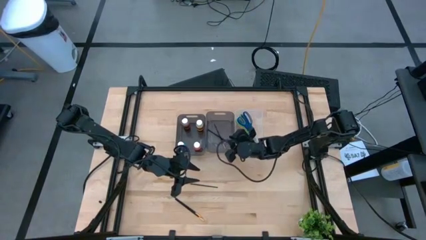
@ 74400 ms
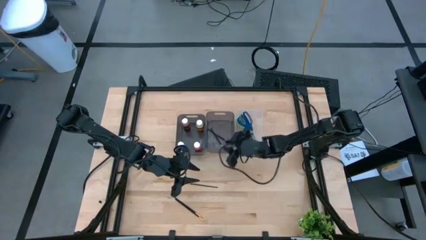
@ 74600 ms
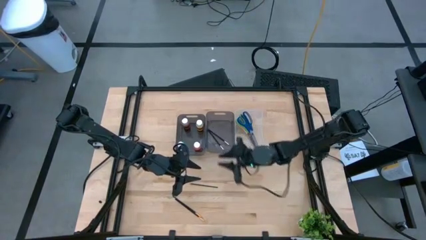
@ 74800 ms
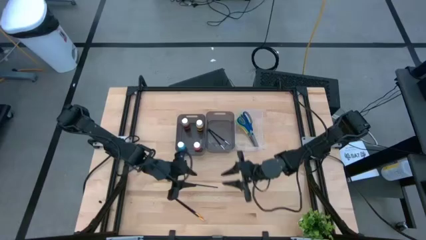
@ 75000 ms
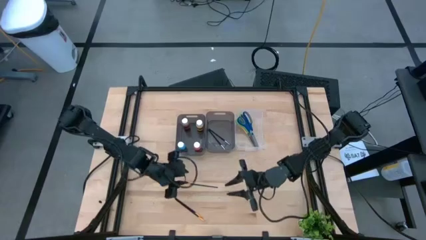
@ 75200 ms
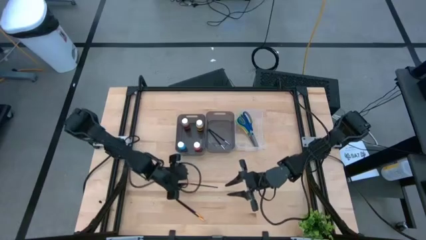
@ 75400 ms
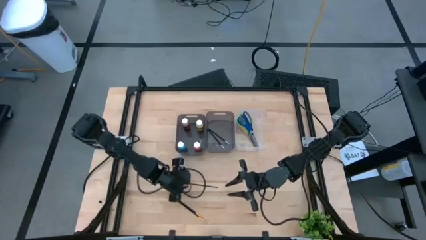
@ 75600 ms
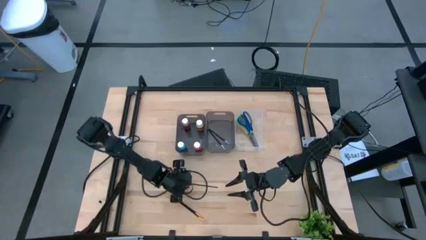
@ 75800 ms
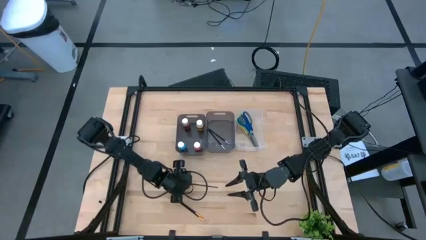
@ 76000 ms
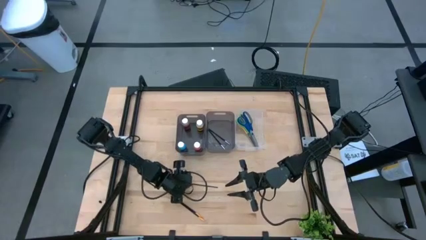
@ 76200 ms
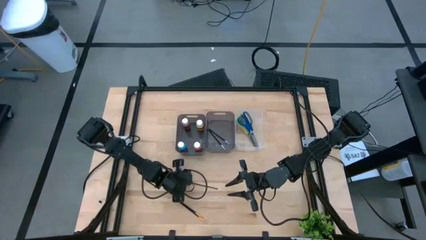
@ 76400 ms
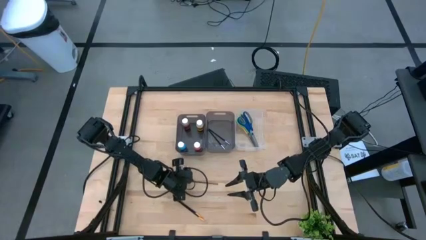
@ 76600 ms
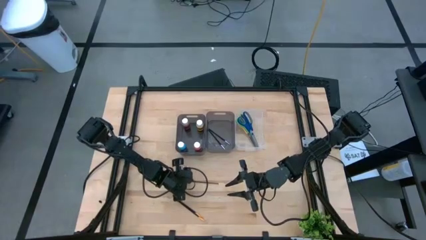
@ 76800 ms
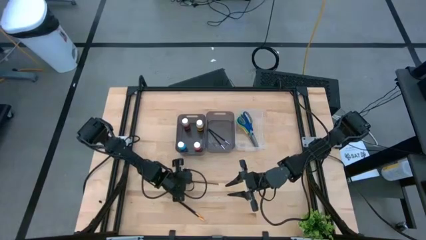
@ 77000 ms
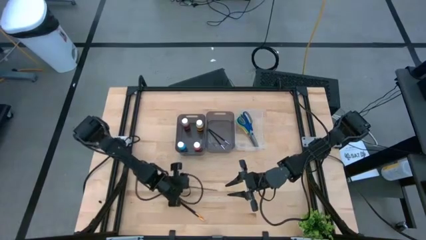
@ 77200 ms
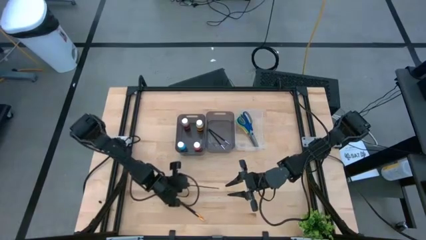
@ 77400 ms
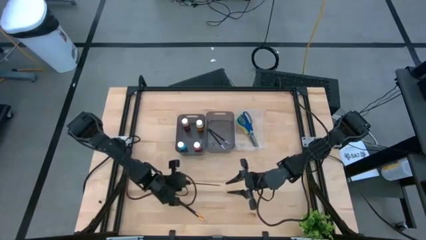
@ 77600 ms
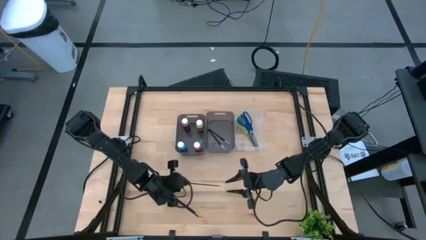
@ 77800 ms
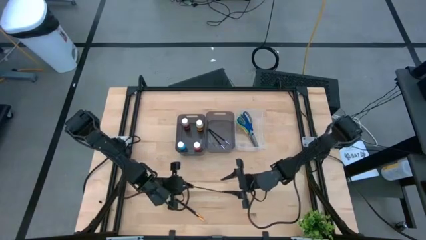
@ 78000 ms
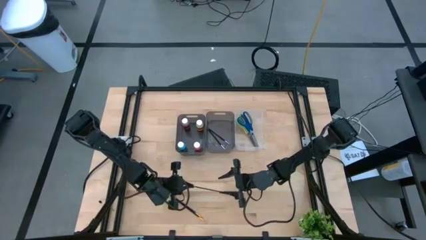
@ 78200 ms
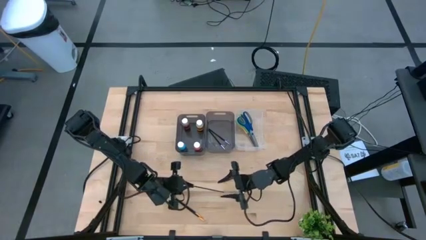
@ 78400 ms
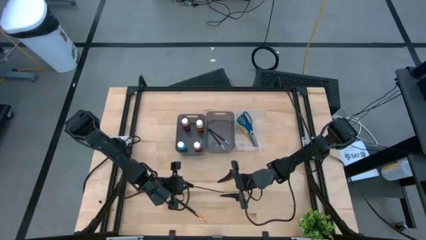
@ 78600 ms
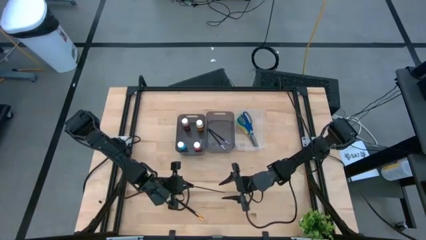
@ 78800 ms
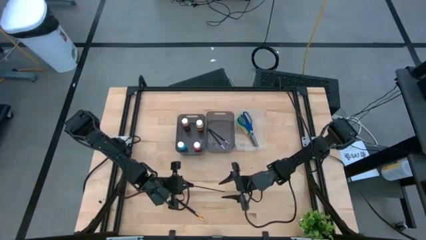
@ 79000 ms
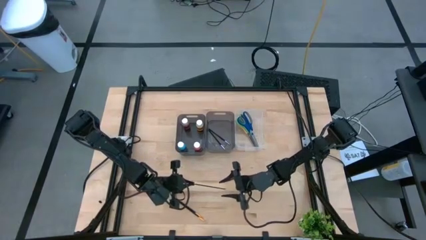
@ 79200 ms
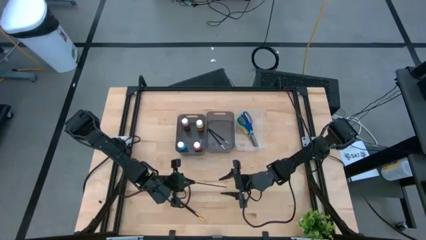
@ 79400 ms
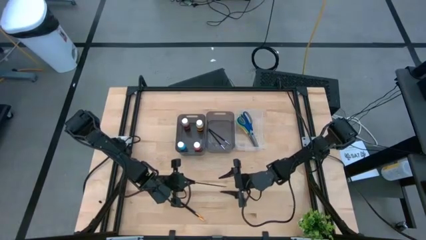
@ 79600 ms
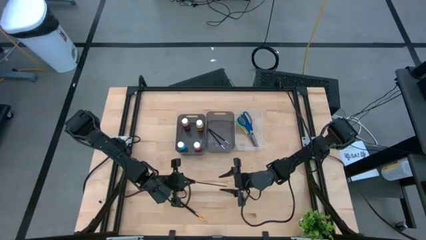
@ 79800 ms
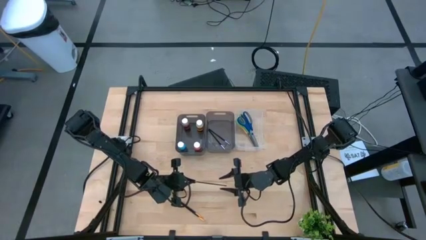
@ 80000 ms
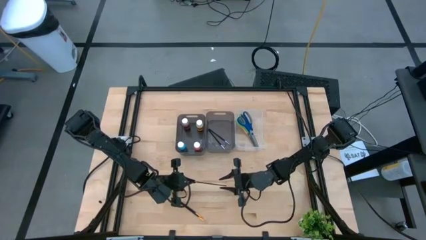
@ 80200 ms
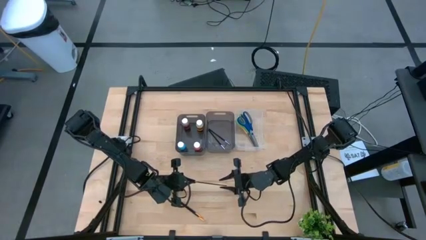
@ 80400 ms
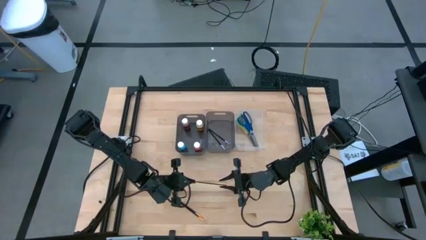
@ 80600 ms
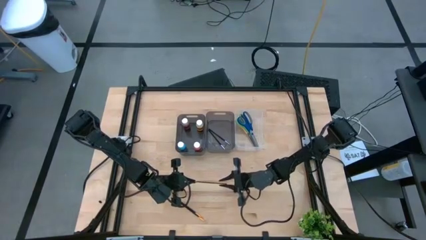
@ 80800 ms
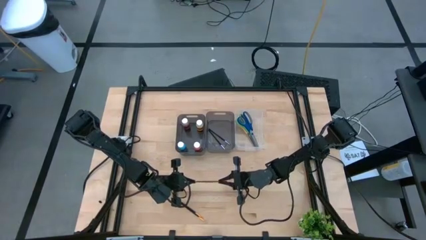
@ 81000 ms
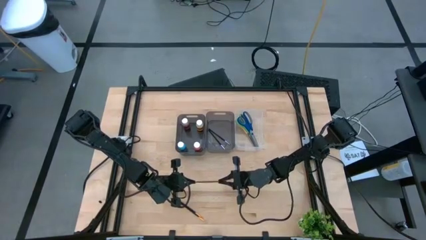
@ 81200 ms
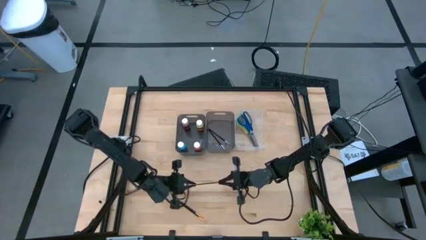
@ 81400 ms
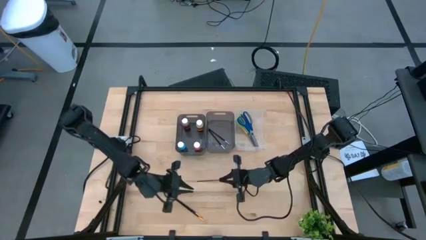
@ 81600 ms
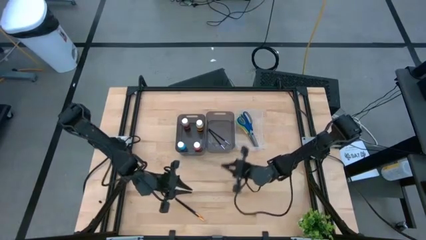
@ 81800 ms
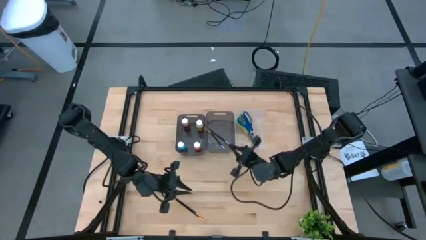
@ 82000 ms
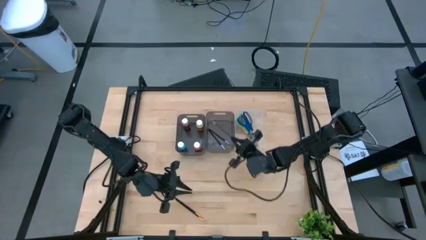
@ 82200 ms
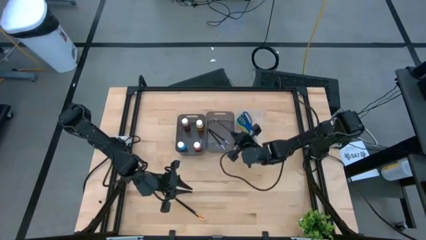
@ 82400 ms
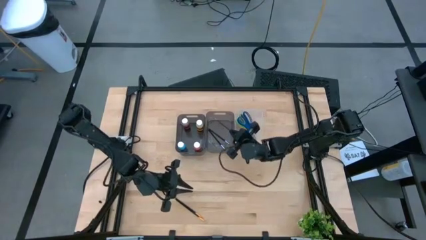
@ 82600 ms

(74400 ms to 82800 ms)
Task: Pick & Place Paint Supplies
Put the top gold paintbrush into the right black bin

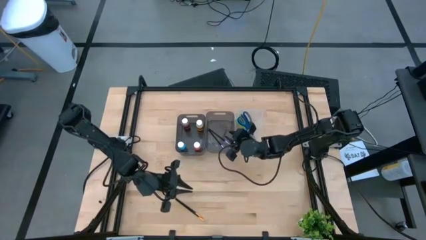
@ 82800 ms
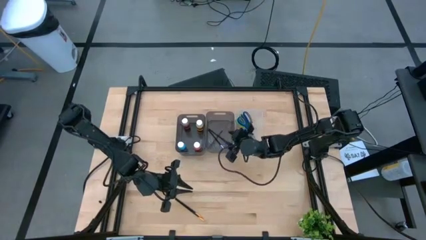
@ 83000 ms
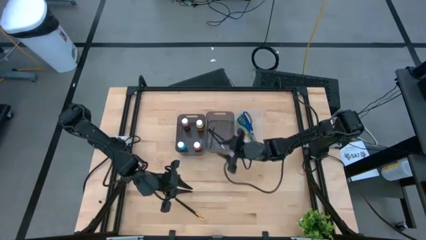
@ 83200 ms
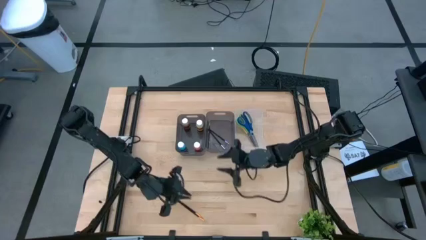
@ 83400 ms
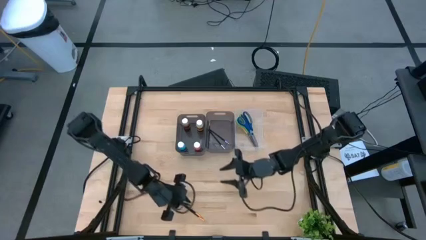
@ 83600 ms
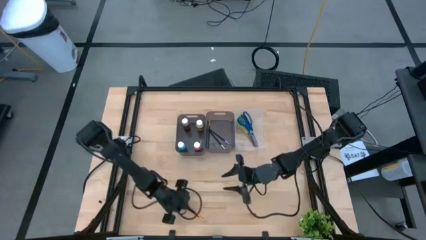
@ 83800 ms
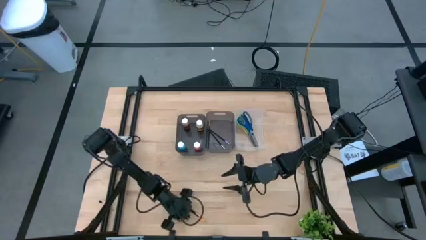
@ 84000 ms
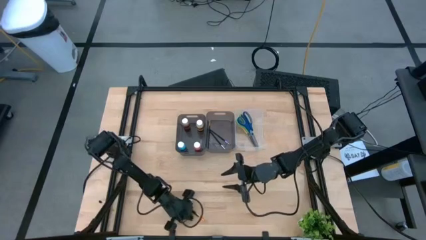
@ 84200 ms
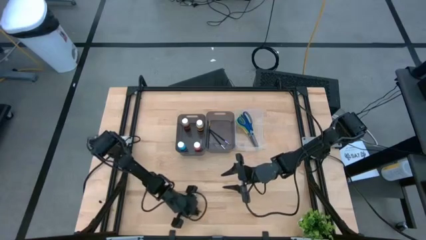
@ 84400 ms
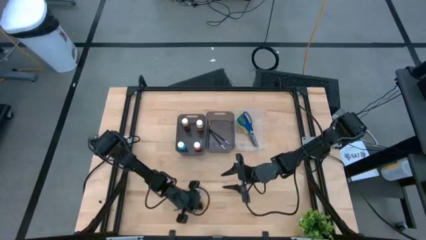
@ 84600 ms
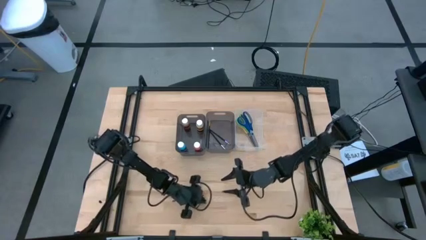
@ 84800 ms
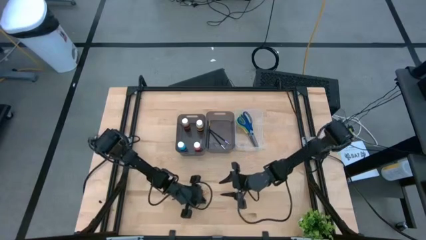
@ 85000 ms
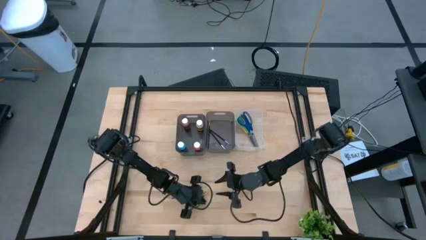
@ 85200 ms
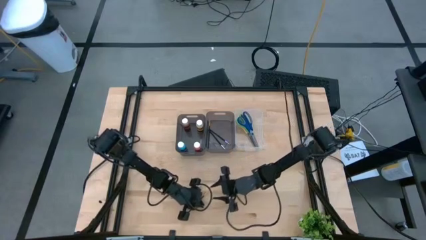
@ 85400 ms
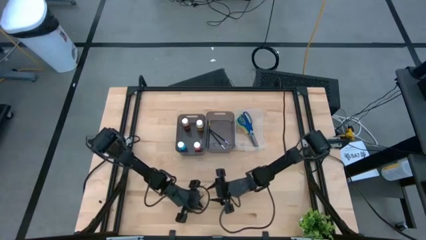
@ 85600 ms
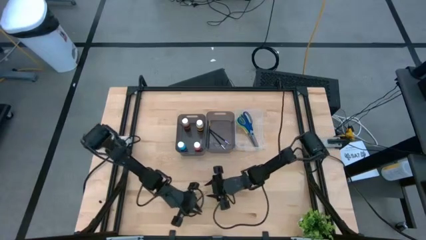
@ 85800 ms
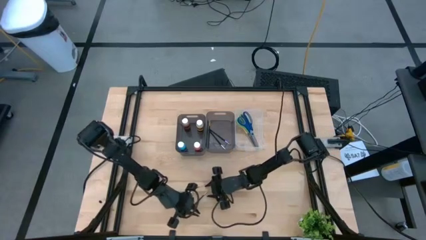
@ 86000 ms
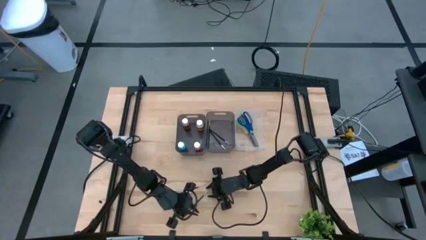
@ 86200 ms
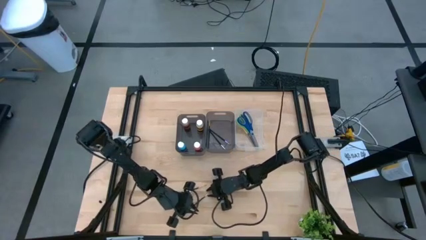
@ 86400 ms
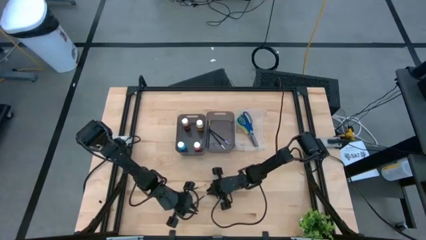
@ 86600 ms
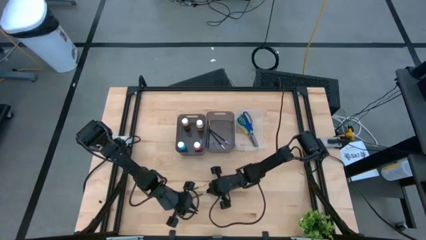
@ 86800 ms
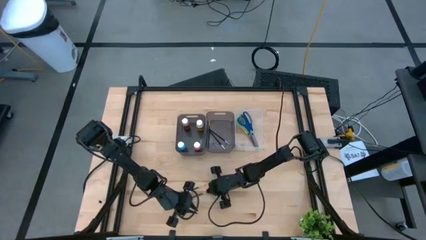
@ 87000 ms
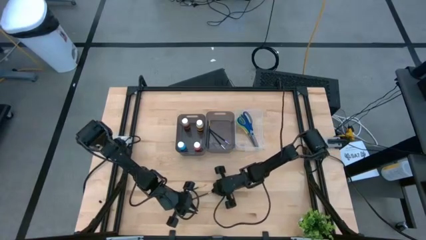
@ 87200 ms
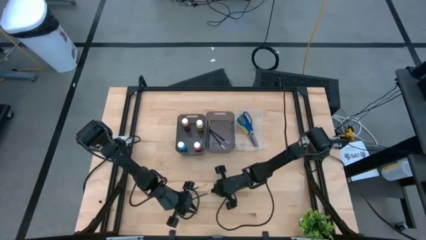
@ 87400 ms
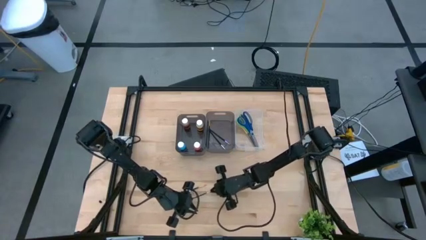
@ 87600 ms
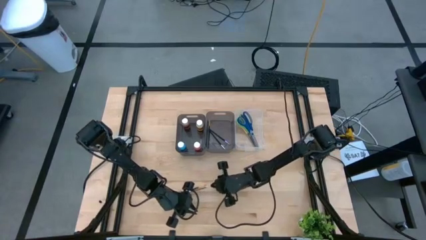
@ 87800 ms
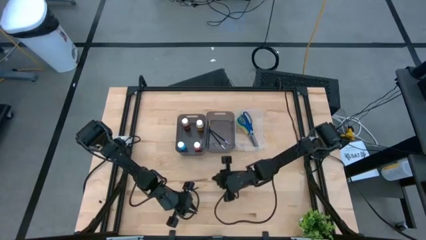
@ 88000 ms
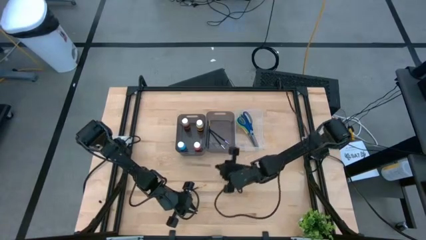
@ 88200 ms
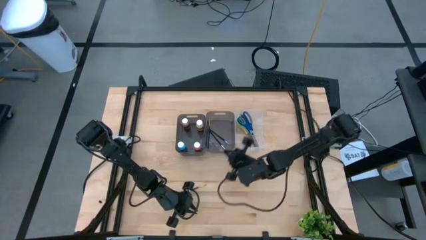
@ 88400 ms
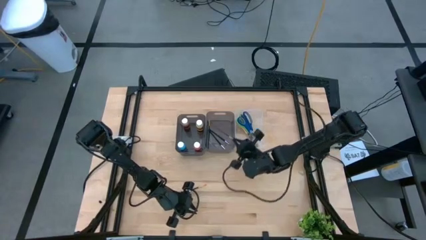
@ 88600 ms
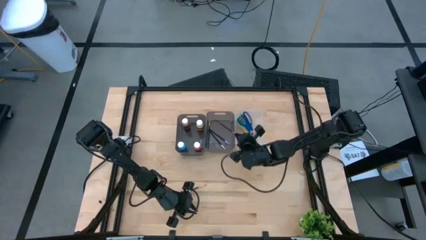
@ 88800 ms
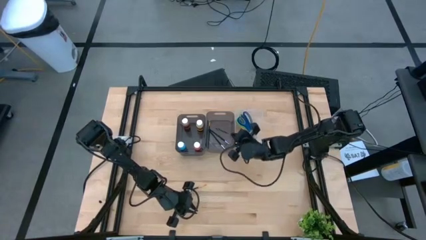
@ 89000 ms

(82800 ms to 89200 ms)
Put the bottom gold paintbrush into the right black bin
